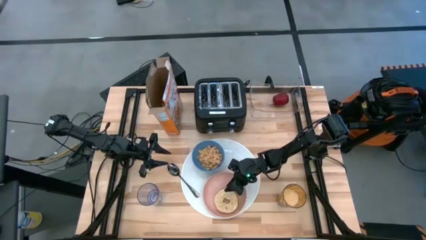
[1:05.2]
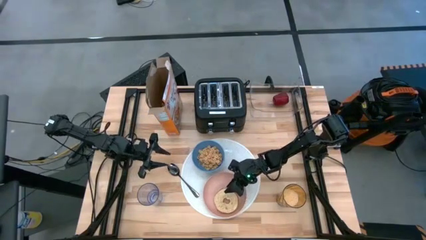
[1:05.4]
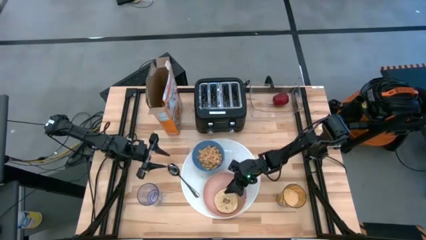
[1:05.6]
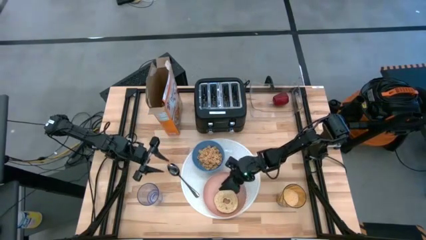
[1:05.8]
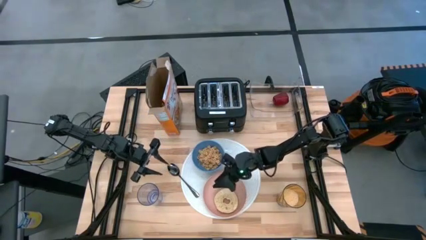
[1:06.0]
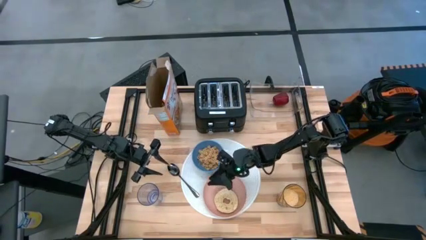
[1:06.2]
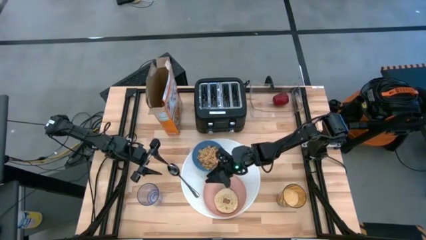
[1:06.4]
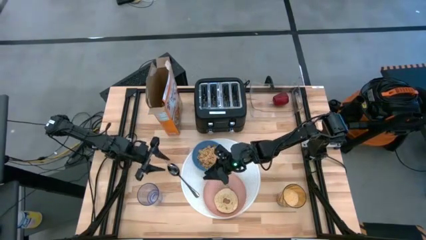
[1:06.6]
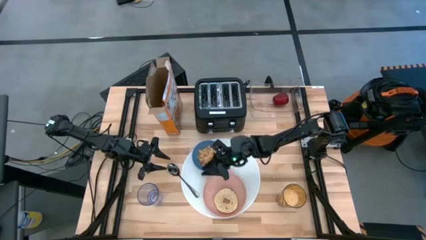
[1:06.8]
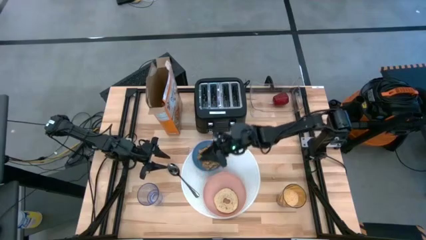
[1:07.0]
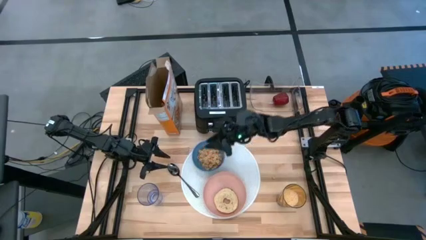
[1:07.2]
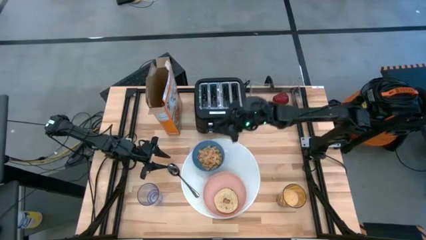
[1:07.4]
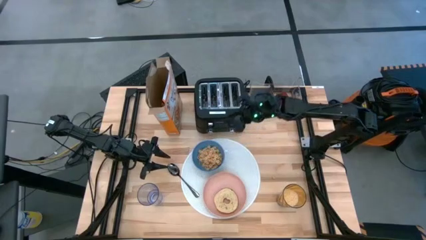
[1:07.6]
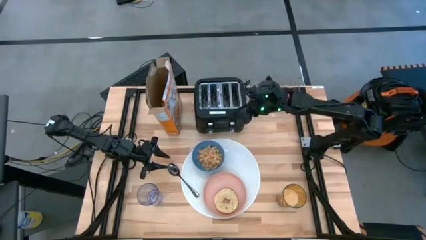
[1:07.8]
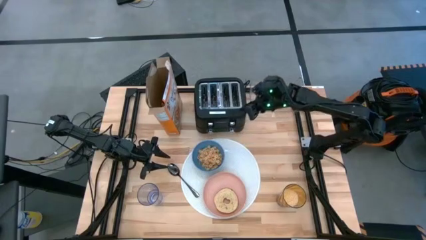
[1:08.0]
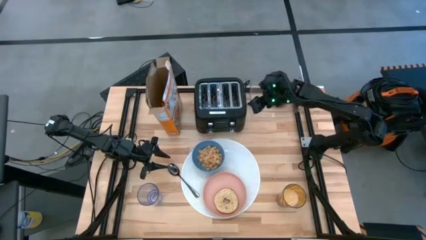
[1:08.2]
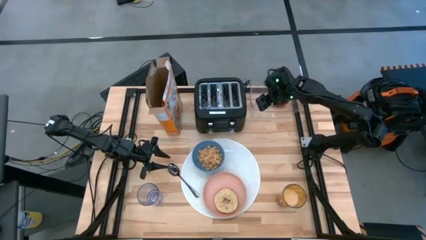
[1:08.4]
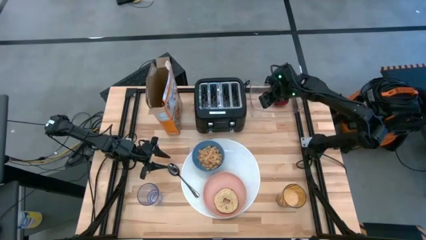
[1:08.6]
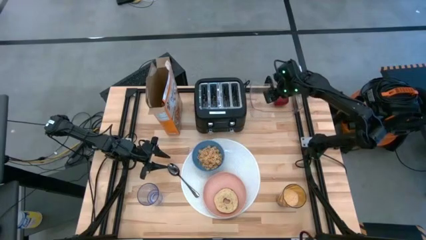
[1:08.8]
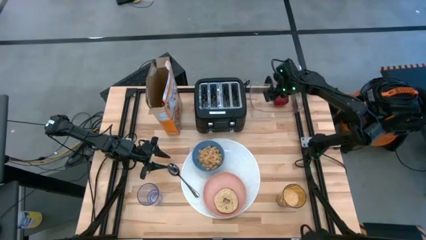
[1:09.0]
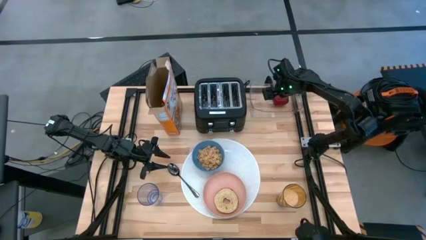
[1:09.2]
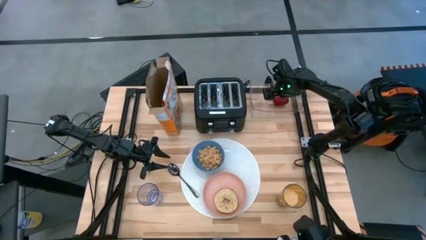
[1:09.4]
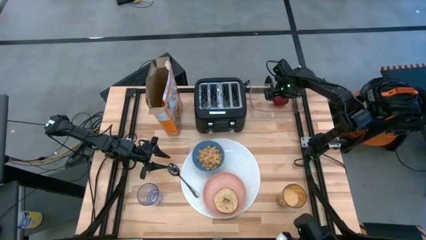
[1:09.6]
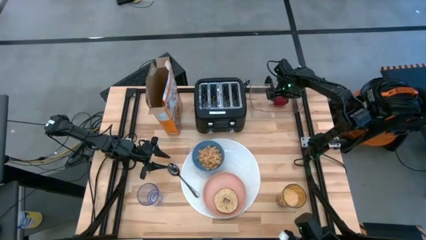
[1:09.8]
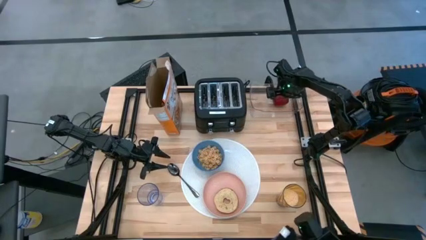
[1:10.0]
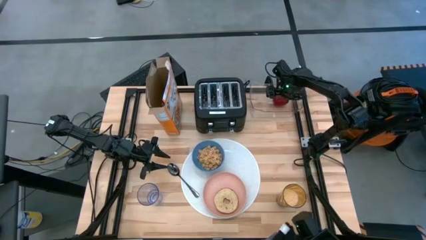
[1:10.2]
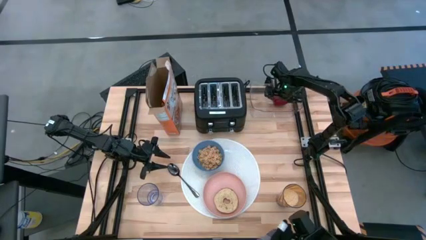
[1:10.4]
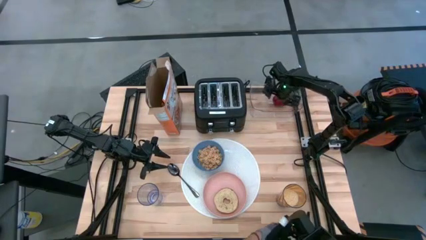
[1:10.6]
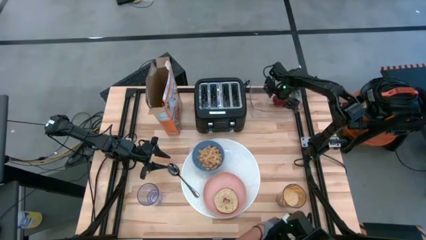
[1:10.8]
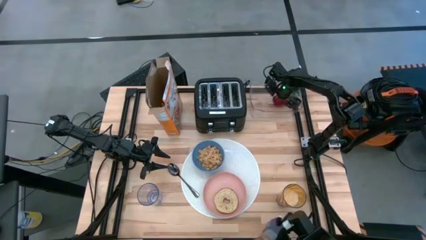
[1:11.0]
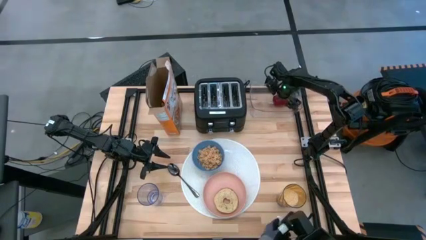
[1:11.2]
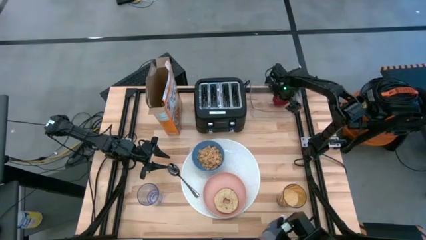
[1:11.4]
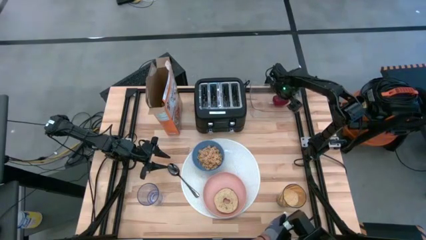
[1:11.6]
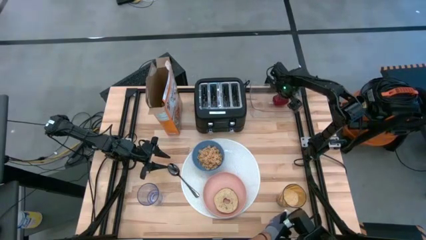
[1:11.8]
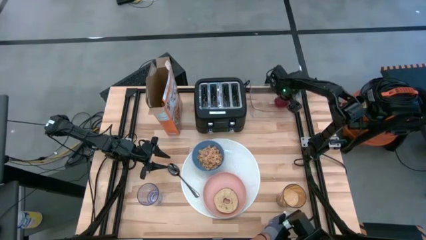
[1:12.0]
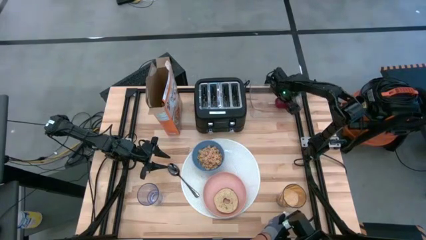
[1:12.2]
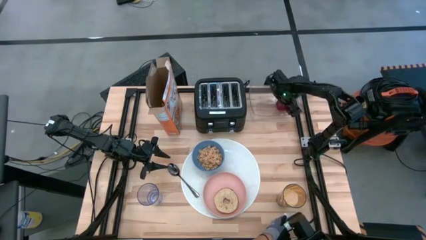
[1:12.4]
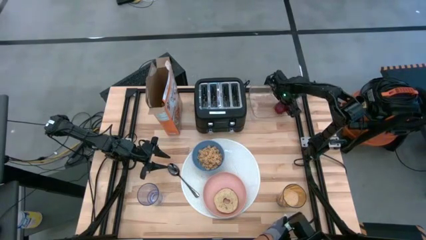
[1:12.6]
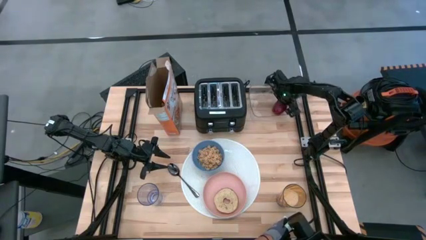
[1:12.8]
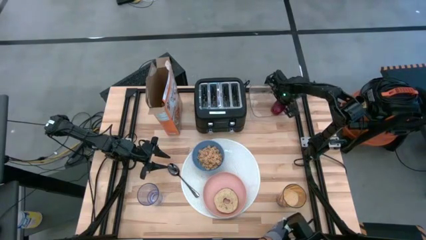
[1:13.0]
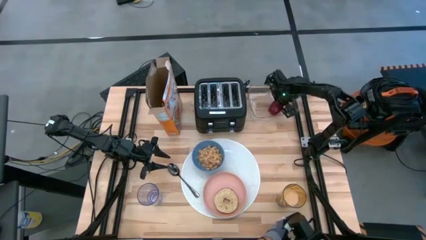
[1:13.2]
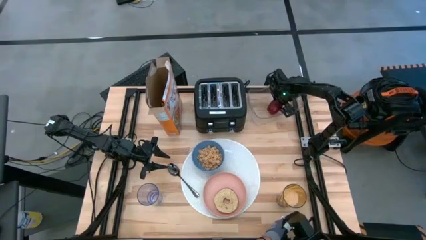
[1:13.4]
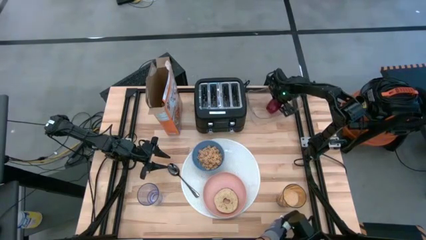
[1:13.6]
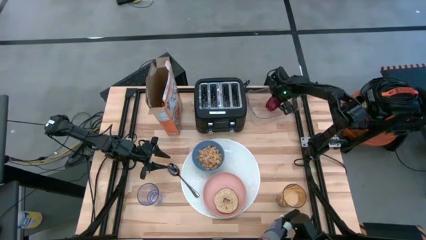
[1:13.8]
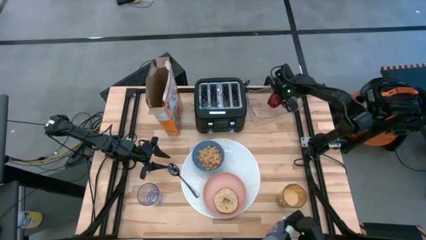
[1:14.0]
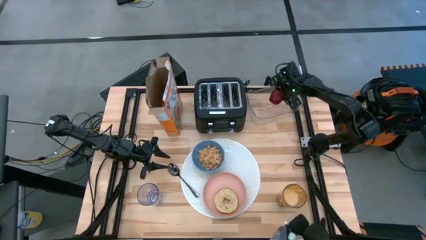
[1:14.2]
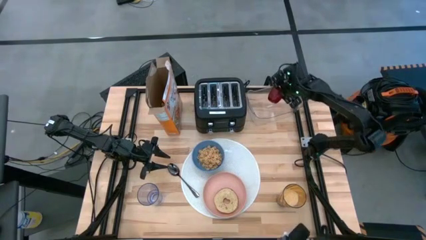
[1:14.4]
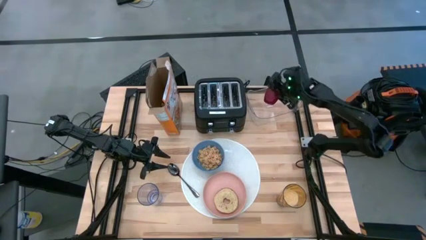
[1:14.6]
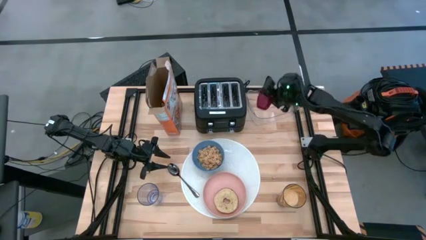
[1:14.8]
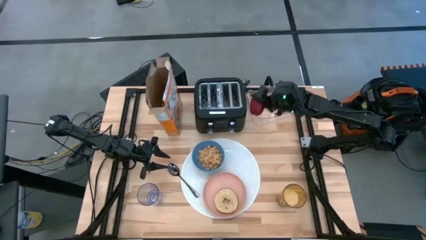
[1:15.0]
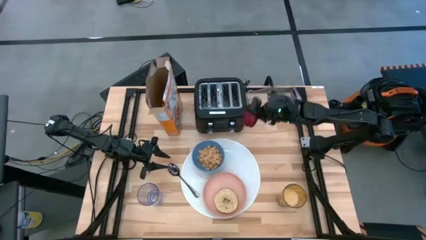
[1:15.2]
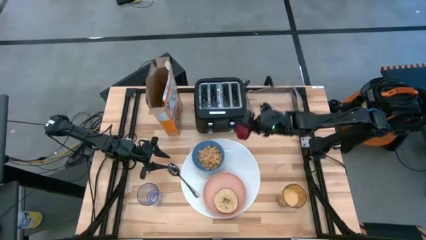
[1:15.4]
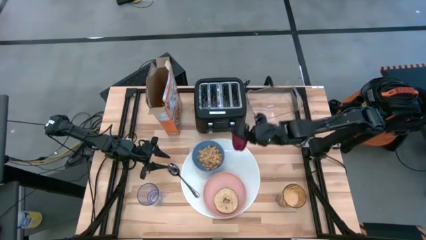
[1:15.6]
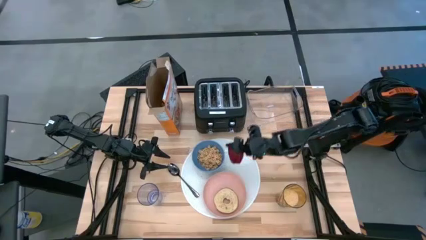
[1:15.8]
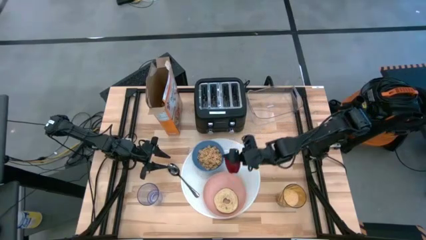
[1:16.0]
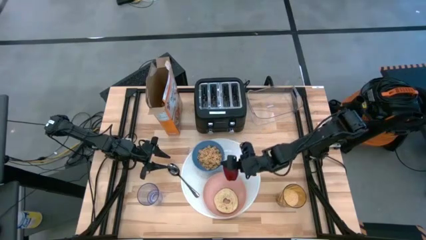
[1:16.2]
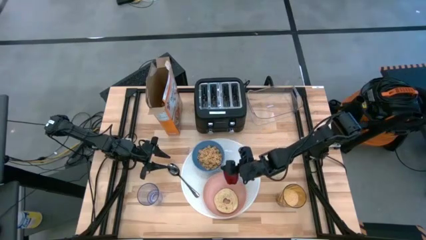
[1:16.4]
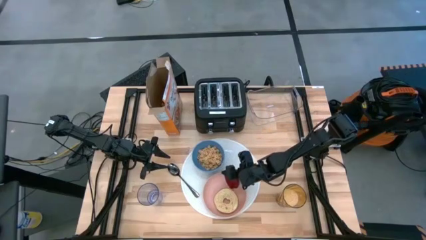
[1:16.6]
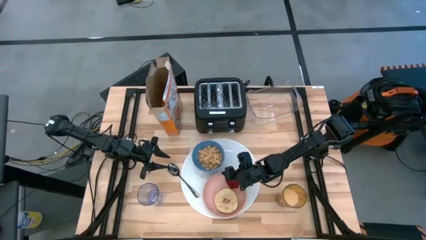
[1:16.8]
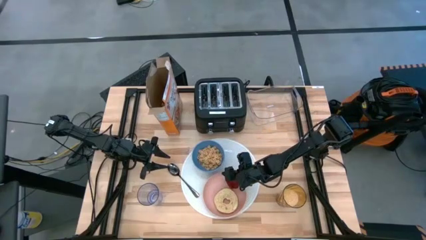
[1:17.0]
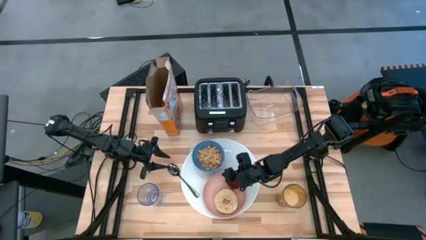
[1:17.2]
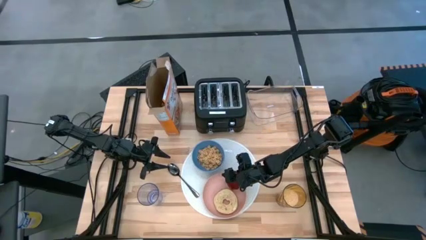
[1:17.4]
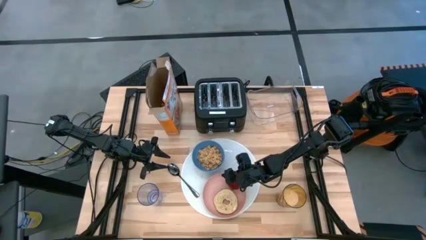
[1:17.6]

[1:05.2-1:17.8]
Task: Arrange a breakfast setting
Put the apple on the plate

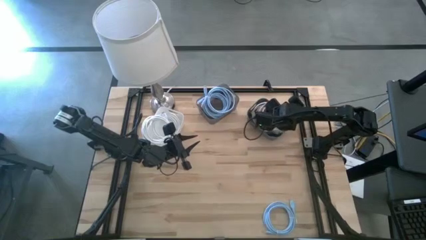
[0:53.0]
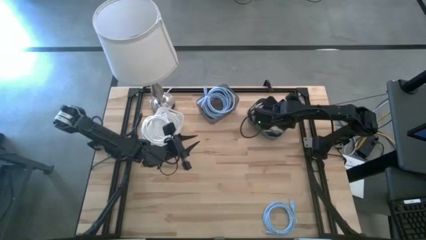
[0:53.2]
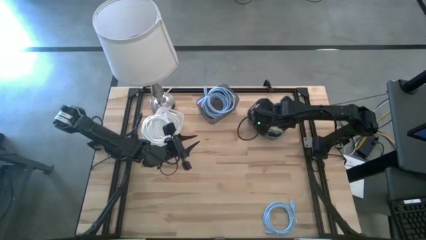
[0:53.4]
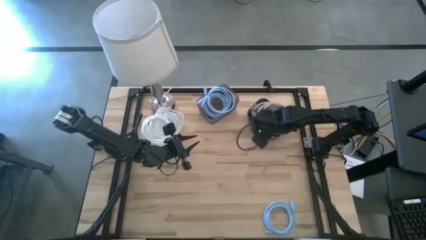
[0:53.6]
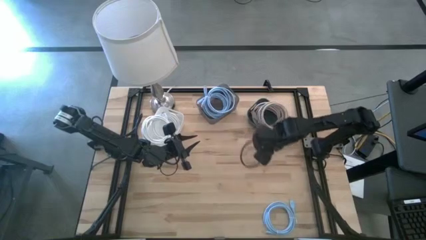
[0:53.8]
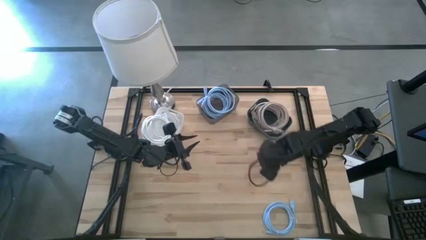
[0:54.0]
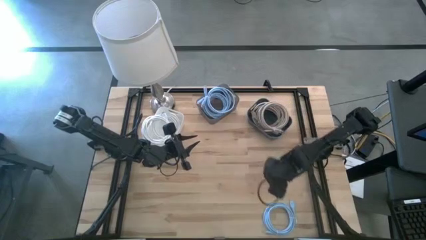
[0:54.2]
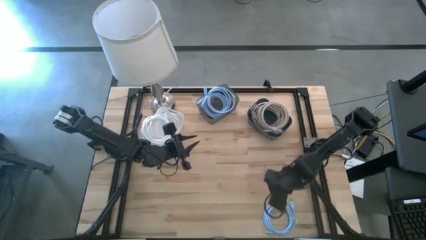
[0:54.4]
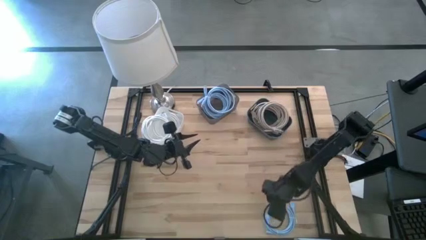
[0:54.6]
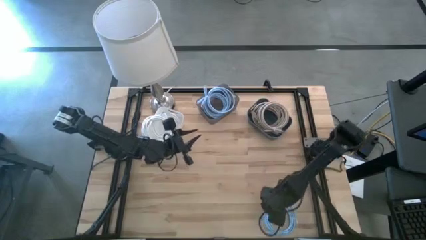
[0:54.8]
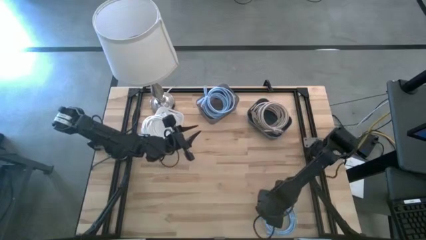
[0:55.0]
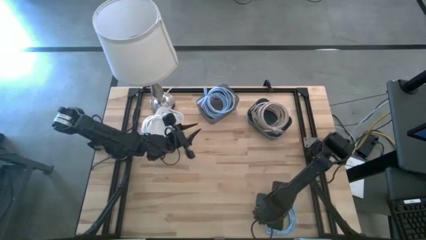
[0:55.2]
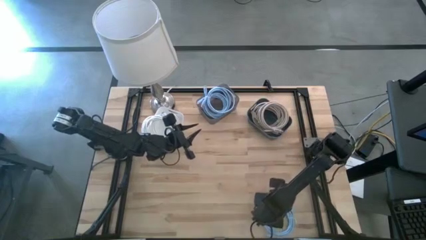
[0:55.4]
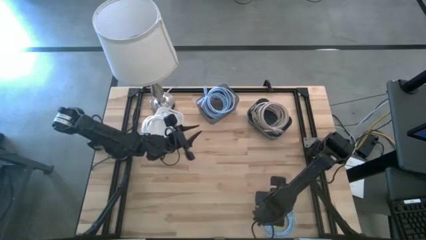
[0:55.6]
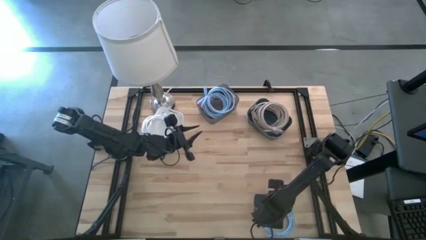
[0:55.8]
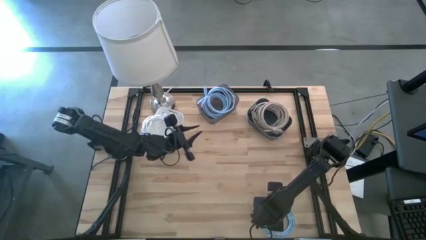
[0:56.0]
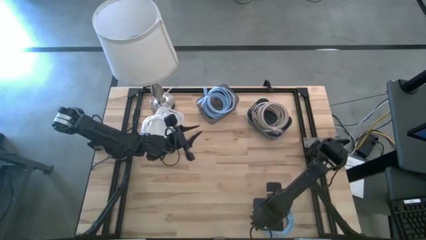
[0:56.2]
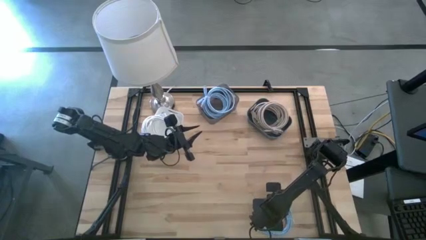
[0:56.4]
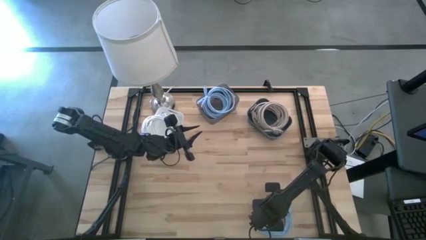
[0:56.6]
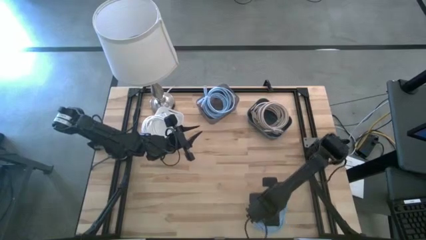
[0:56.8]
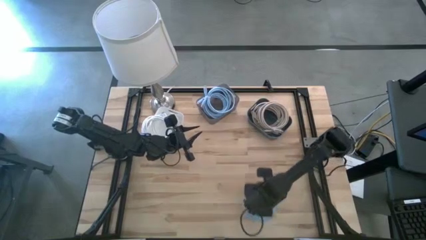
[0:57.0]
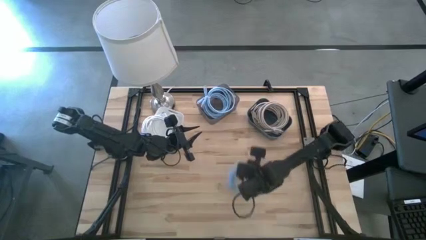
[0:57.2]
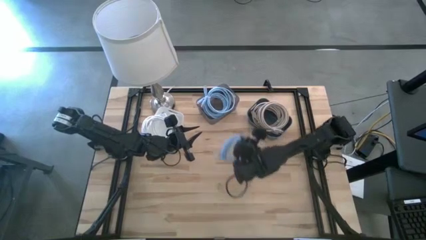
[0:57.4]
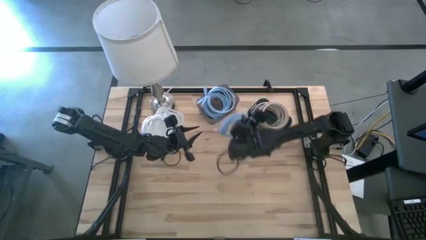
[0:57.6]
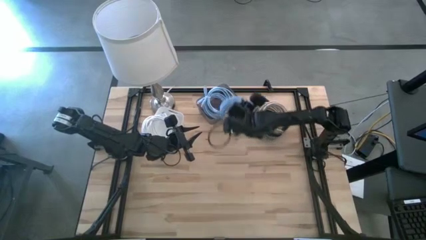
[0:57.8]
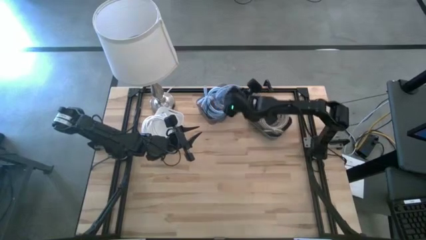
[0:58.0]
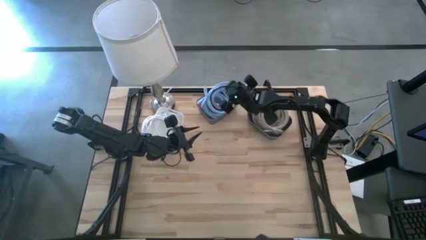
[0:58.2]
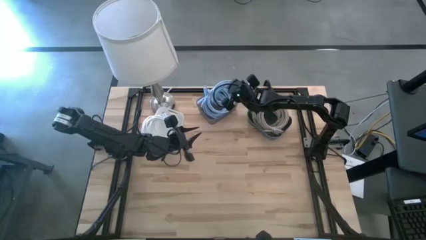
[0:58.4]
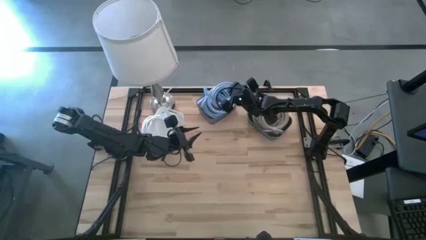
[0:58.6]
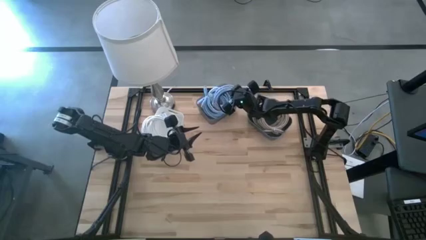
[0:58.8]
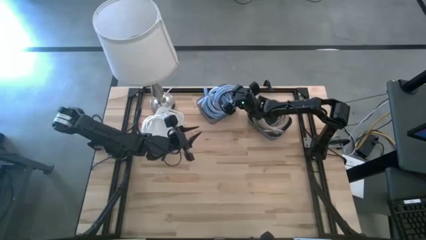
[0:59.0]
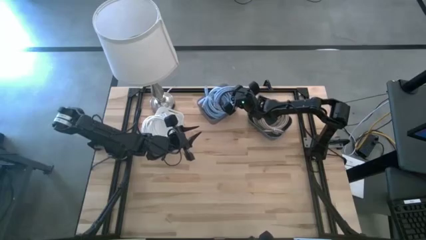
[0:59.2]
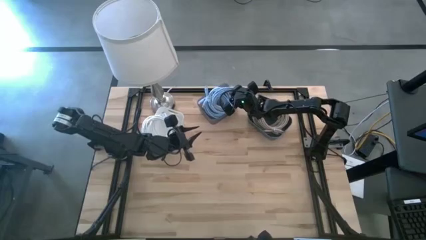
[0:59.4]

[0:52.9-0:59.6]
Task: Sort HDMI cables
Put the light blue HDMI cable into the black bin
